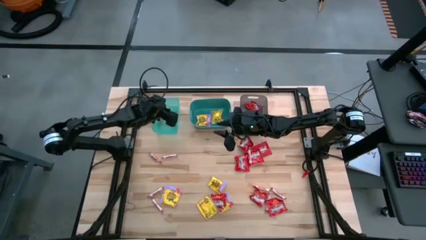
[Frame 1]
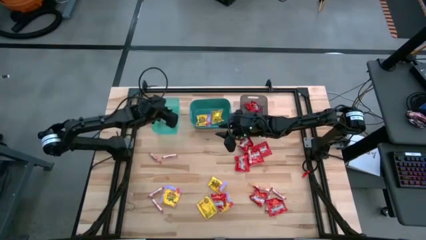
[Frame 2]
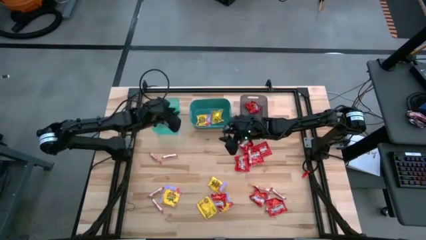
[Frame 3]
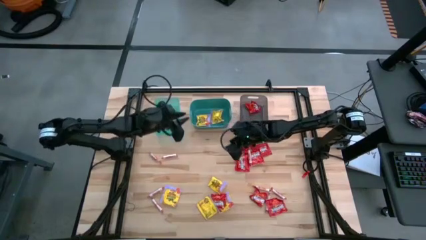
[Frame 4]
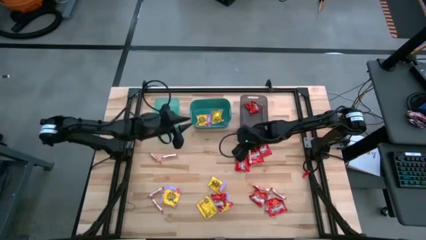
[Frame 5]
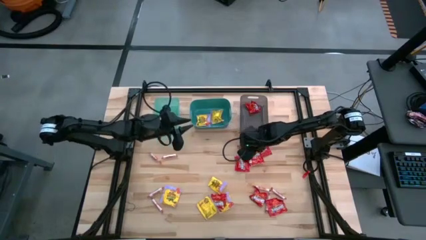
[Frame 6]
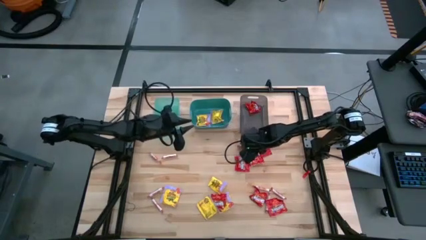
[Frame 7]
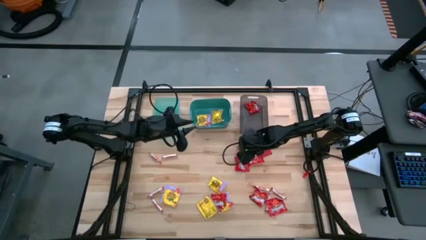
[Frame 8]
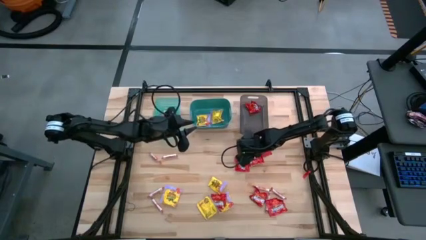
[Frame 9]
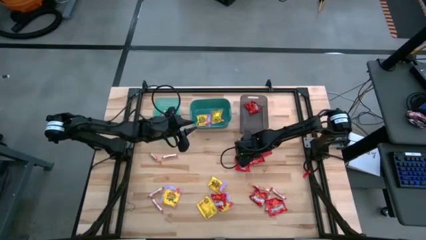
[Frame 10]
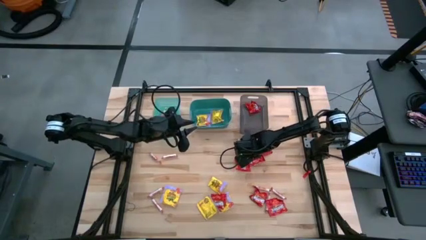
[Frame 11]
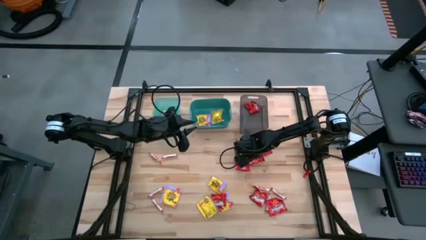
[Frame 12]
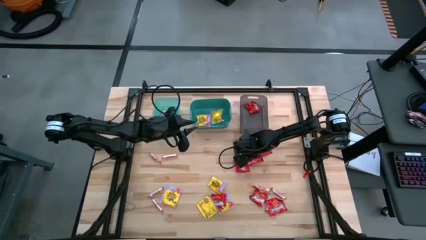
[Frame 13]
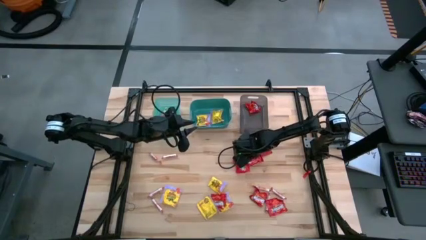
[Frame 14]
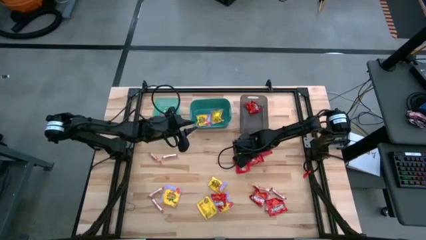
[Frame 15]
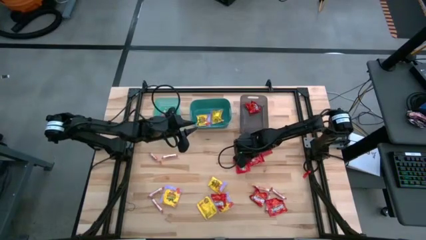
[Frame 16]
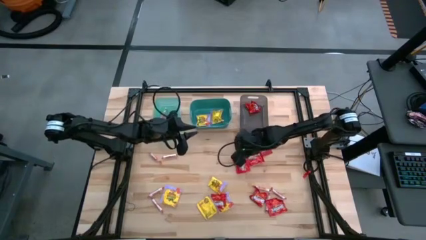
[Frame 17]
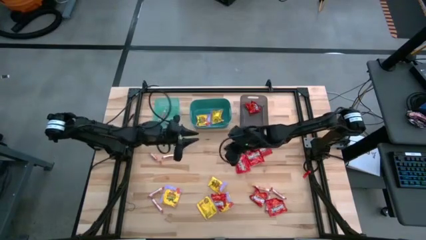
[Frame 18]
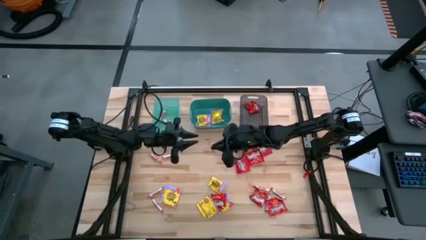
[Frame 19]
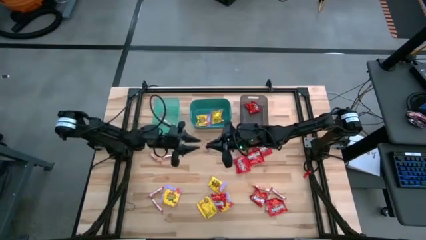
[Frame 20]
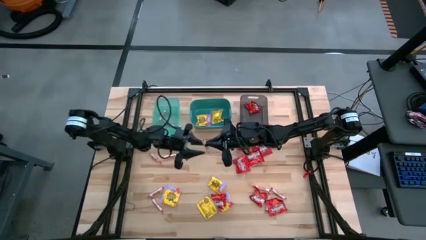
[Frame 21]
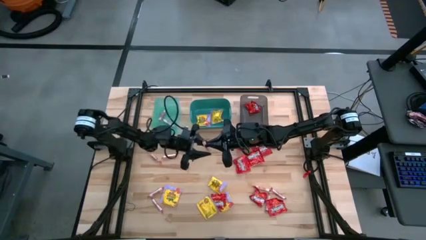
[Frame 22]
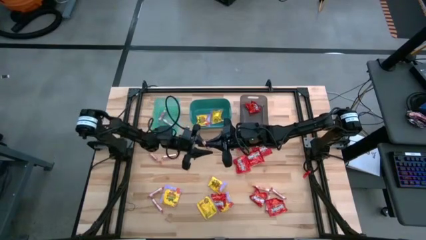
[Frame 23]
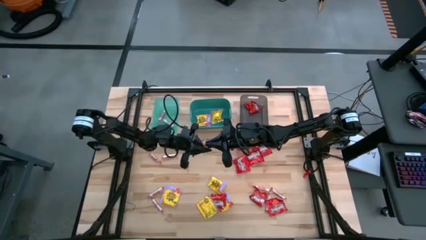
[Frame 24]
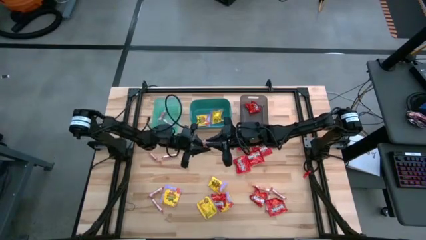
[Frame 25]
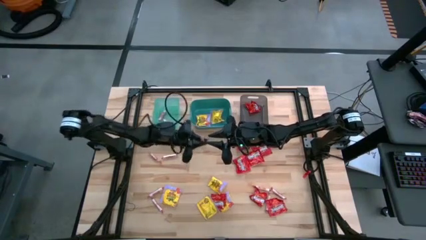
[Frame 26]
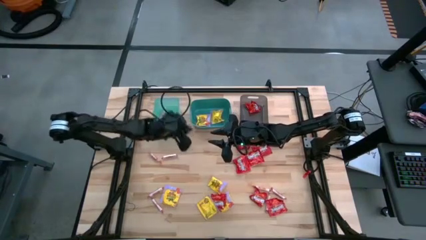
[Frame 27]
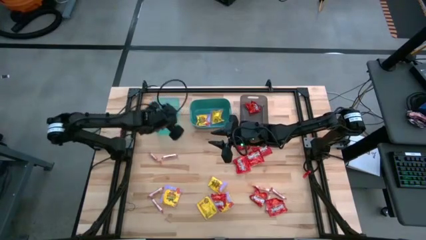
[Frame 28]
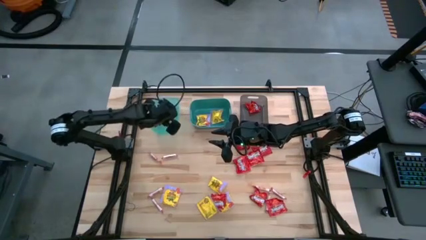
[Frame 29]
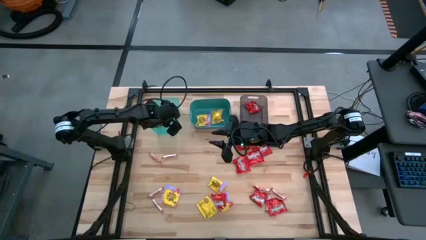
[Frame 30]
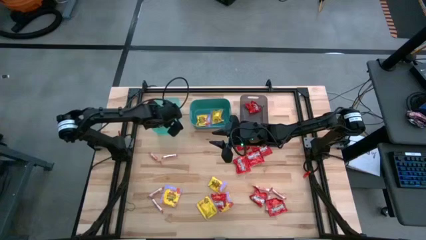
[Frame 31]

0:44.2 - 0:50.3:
Task: Sort candy
Put the white candy into the blue bin

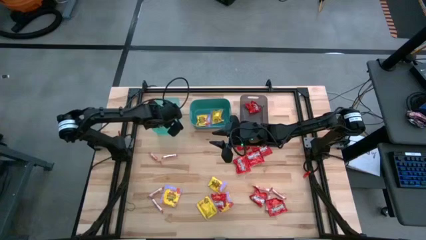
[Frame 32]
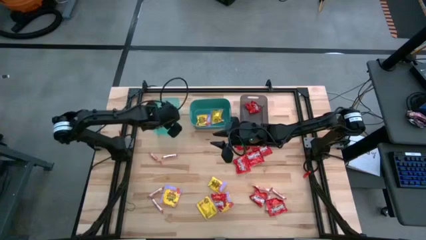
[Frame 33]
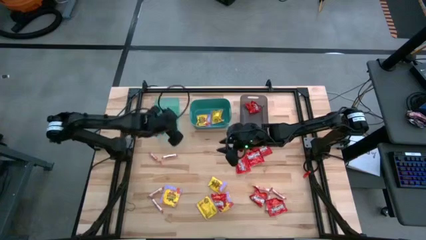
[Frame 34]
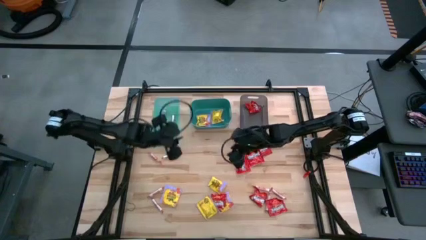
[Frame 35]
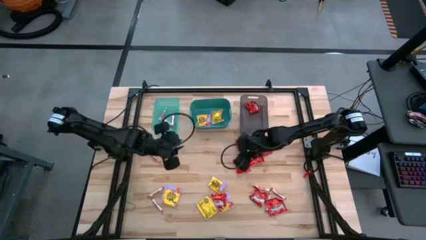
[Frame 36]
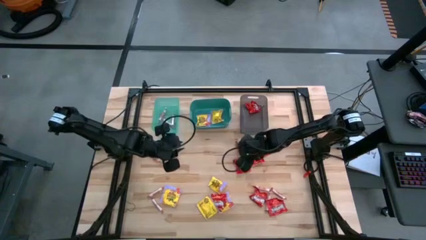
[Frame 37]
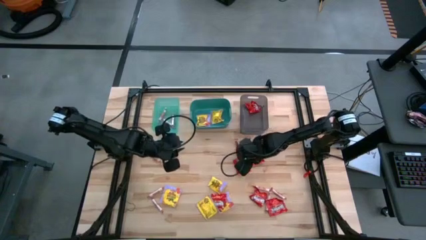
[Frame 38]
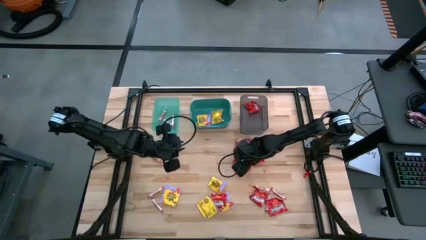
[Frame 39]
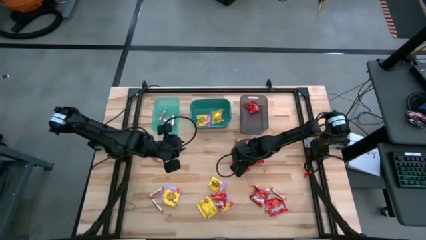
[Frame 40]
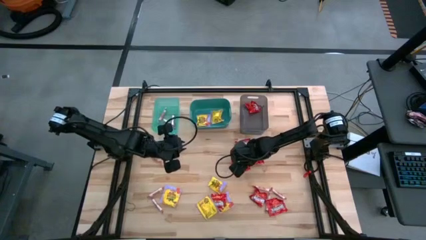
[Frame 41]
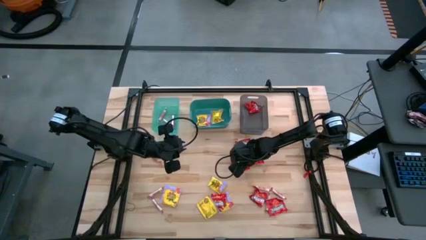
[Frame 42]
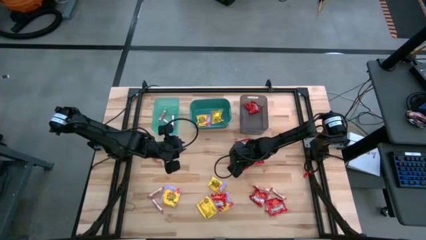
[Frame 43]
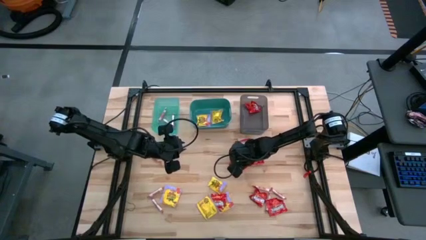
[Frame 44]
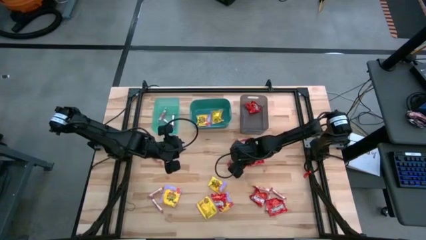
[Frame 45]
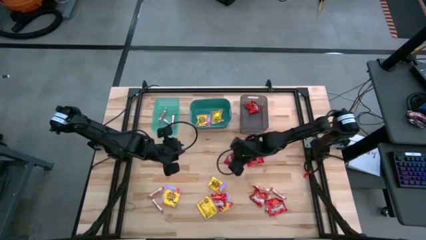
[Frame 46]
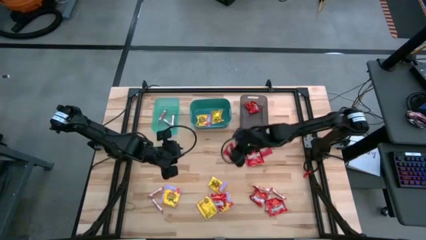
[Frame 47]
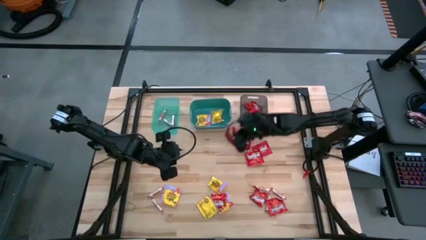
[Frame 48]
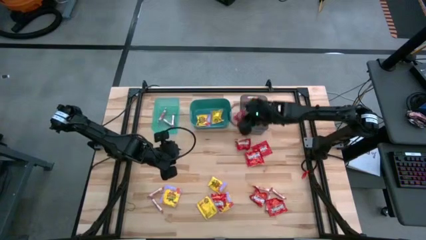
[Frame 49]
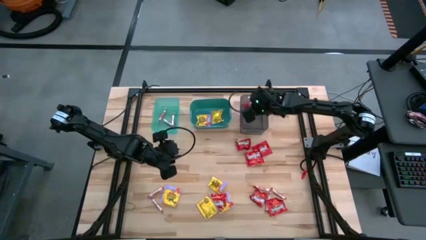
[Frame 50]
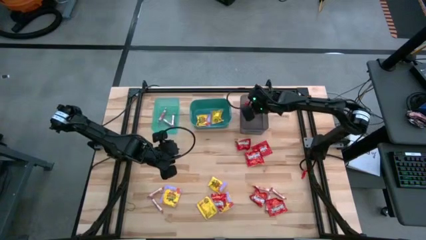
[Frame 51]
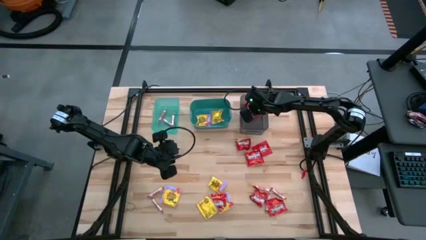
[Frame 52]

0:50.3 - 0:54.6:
Put the red candy into the black bin

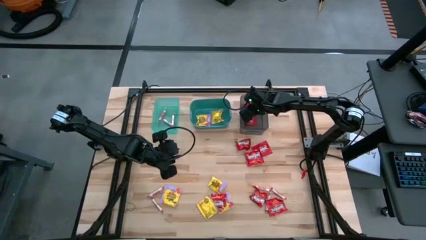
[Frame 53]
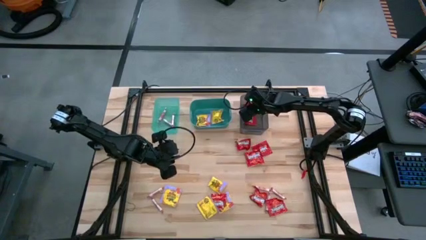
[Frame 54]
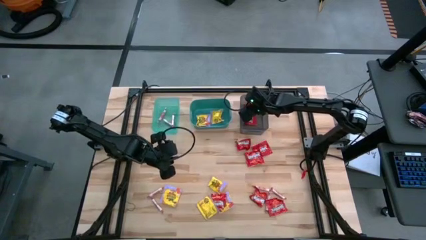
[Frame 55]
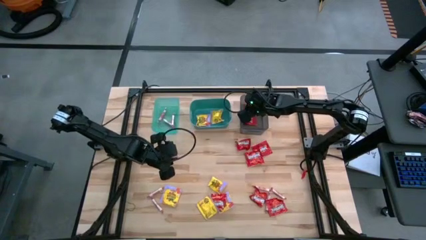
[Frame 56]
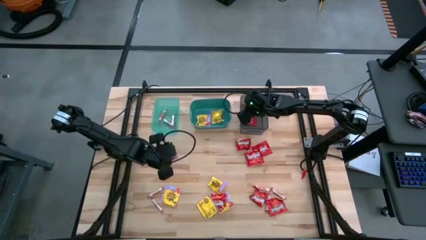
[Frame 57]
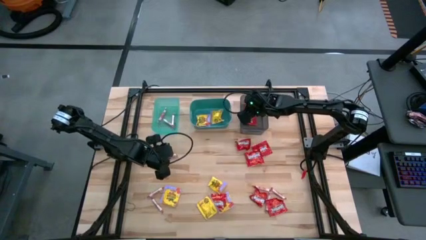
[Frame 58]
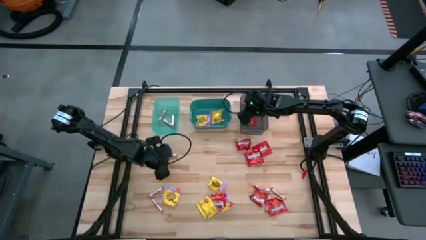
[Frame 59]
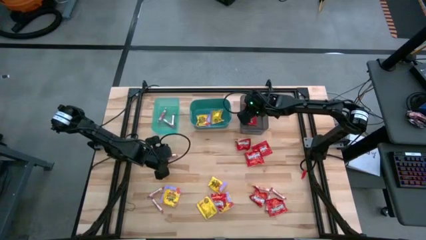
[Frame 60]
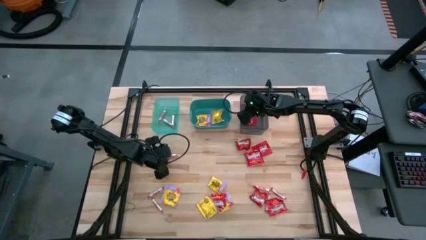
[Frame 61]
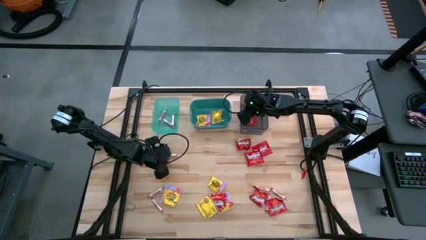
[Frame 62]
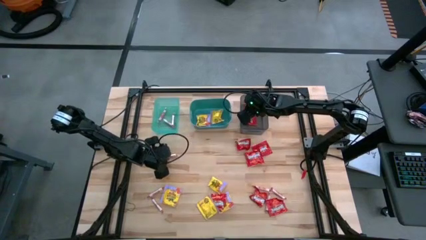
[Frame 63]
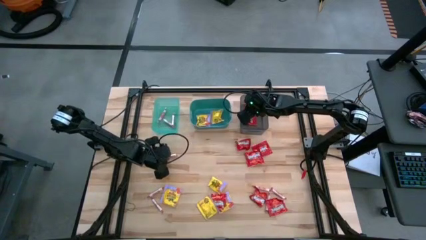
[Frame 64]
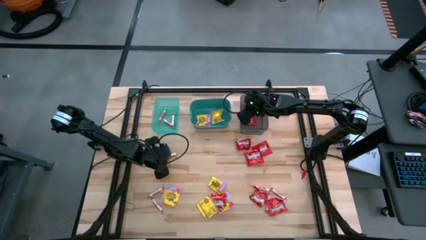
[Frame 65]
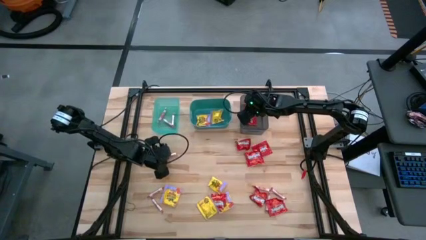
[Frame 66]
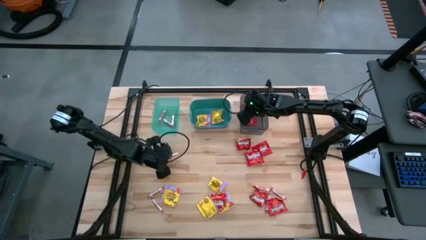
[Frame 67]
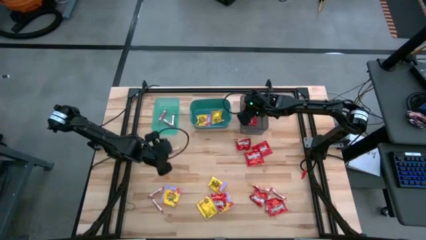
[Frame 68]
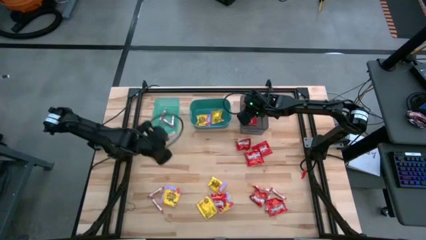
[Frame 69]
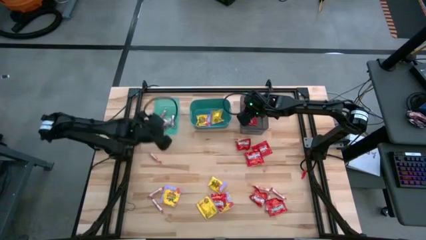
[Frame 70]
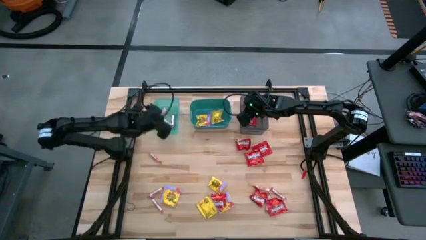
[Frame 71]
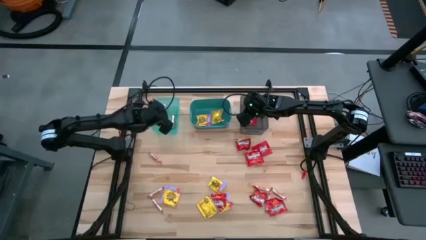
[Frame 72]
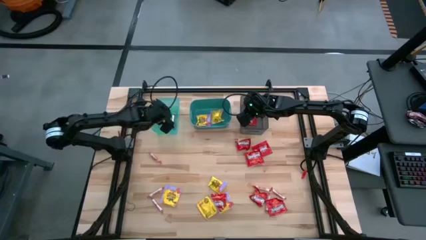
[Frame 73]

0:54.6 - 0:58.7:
Put the white candy into the blue bin

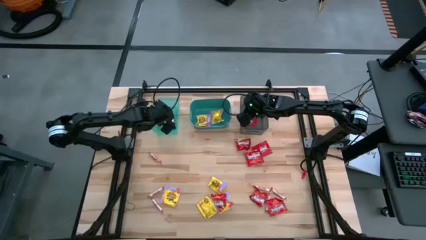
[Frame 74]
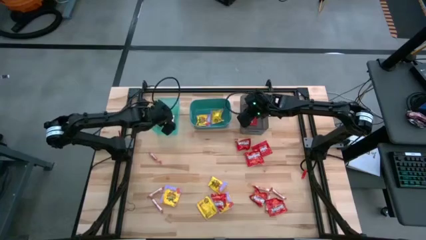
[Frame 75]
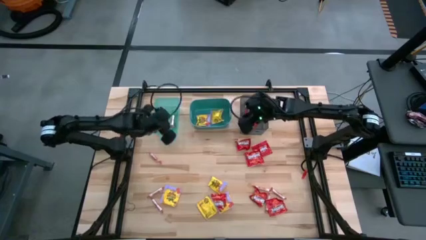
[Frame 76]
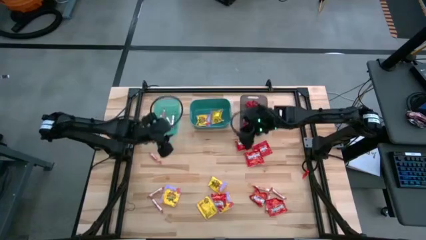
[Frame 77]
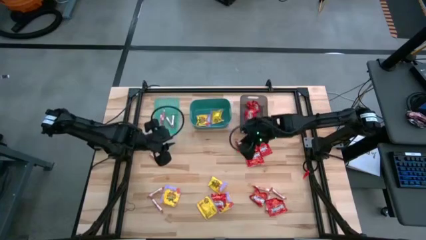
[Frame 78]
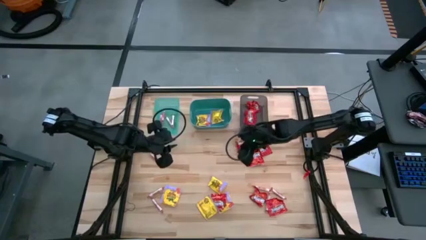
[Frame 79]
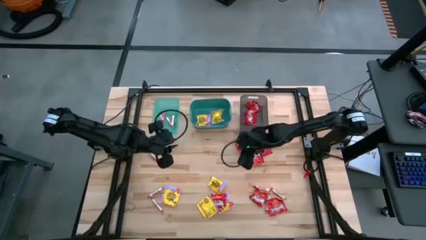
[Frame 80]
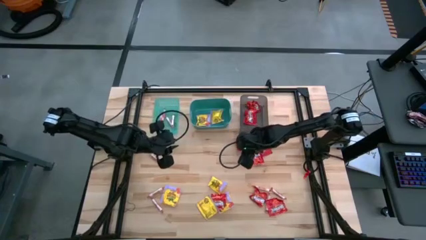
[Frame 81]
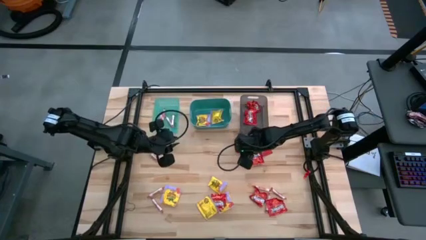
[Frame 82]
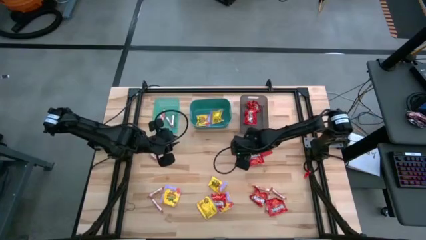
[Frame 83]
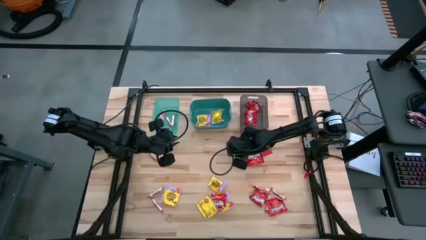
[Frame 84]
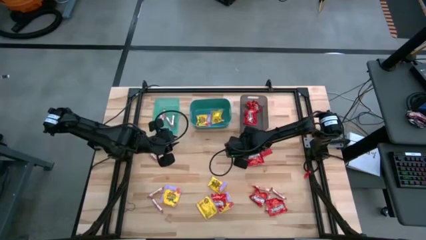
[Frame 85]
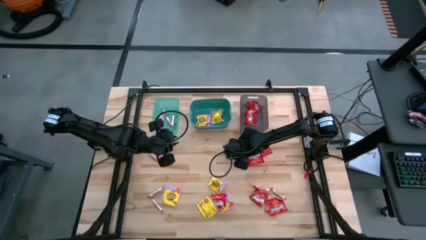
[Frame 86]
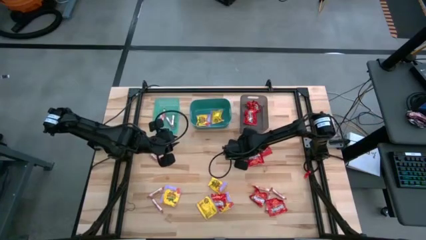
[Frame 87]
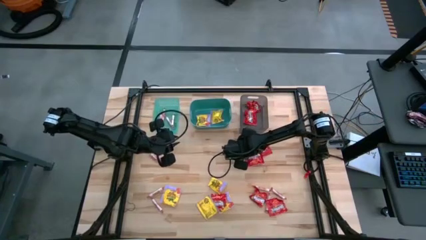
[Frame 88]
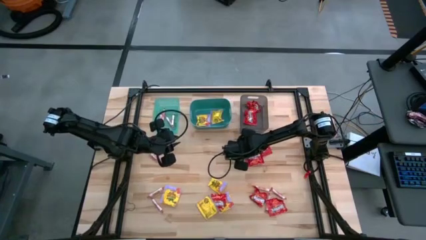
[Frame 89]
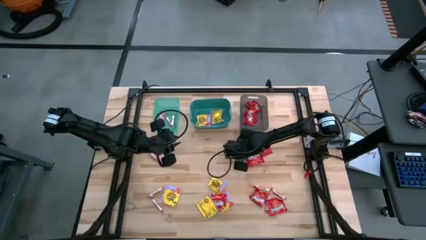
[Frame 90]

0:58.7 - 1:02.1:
Put the red candy into the black bin
